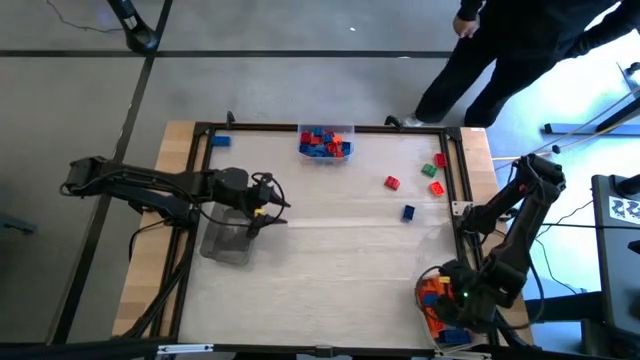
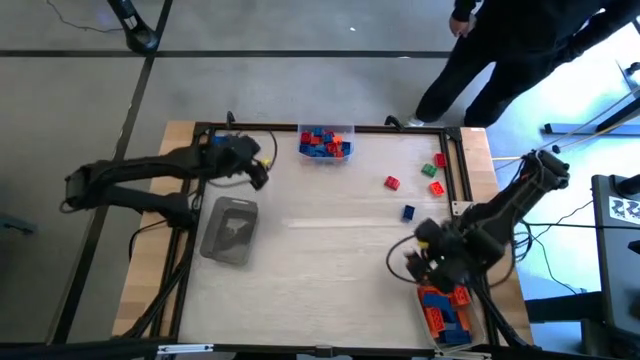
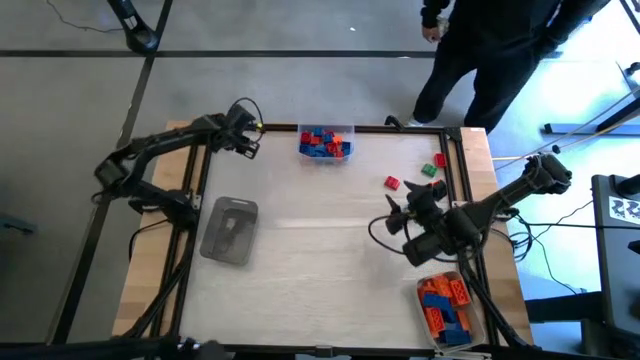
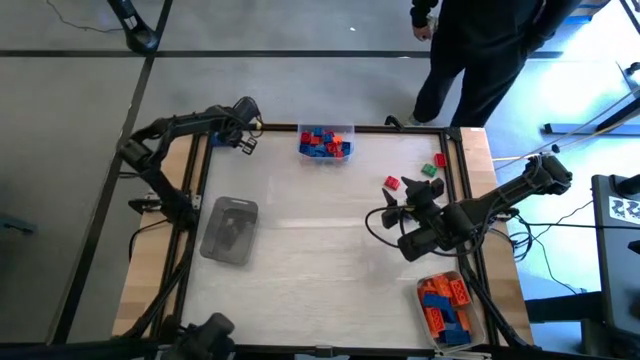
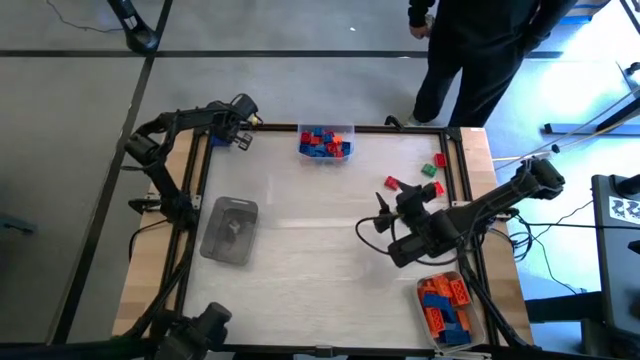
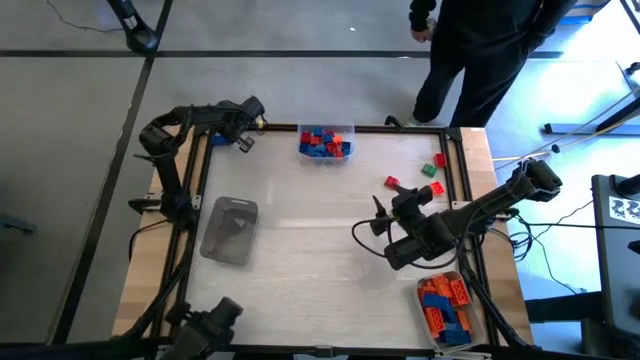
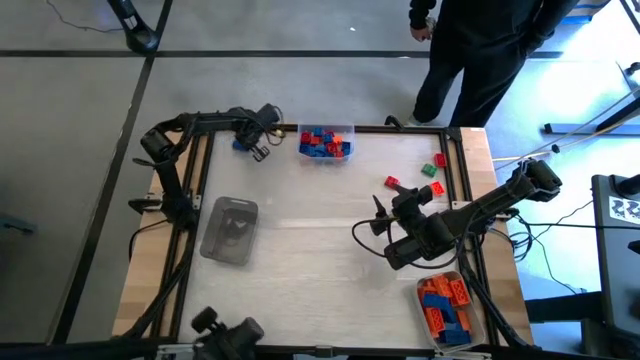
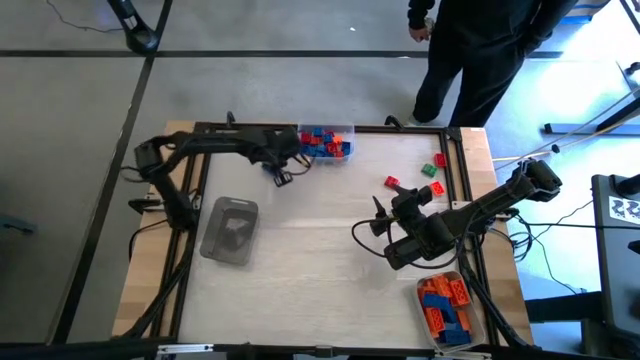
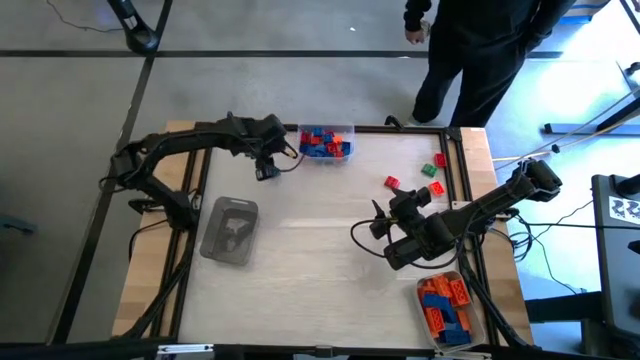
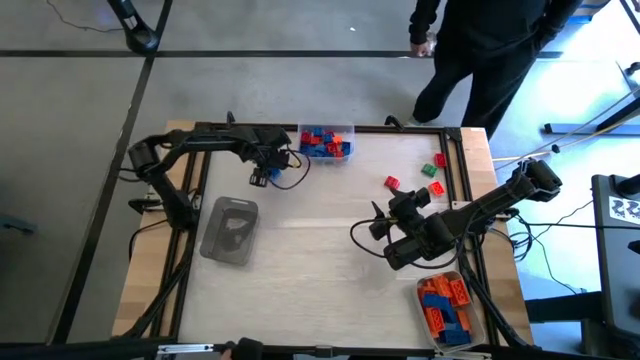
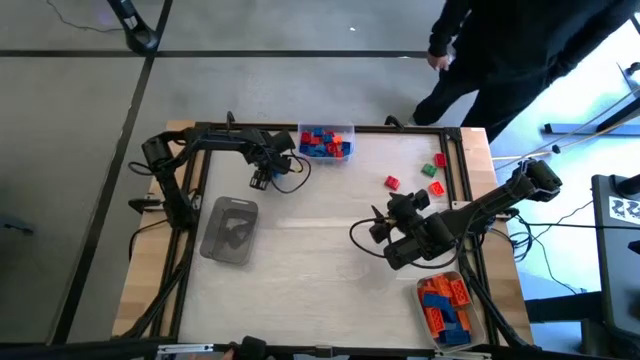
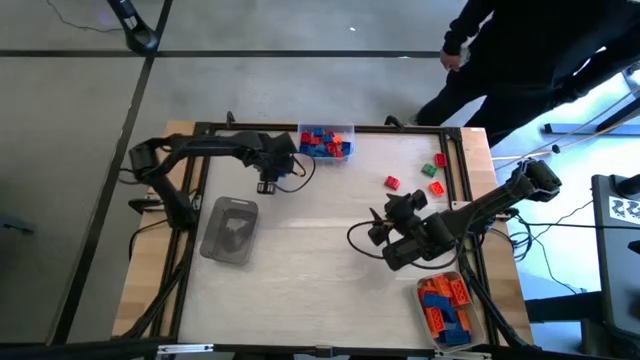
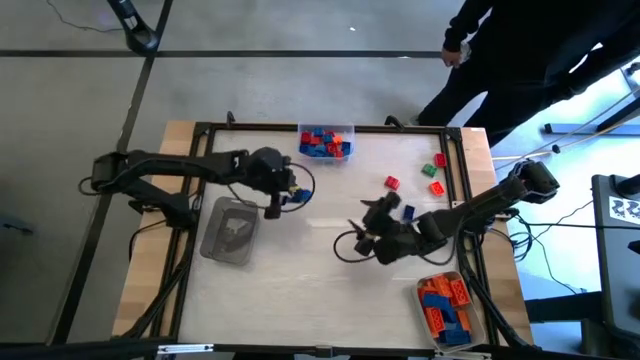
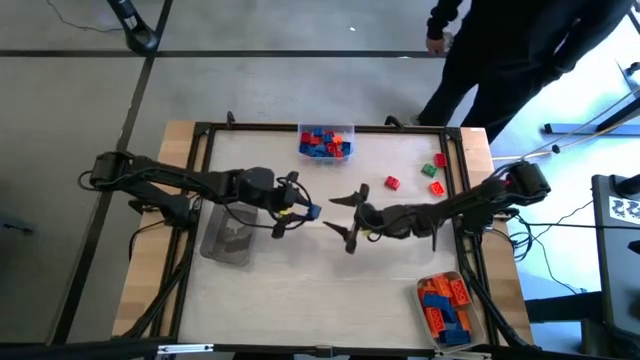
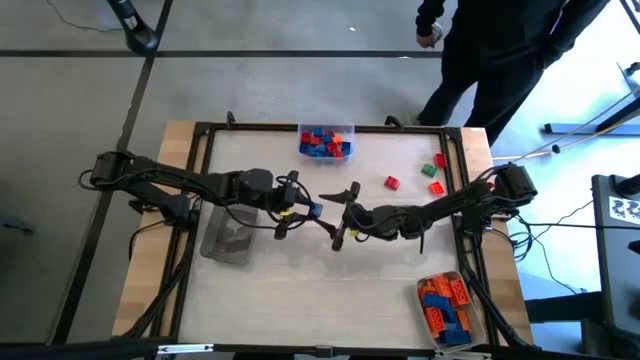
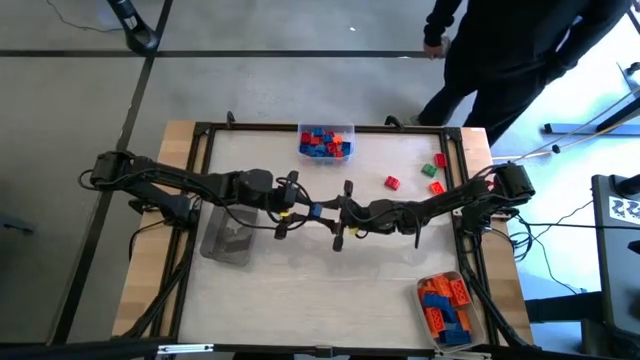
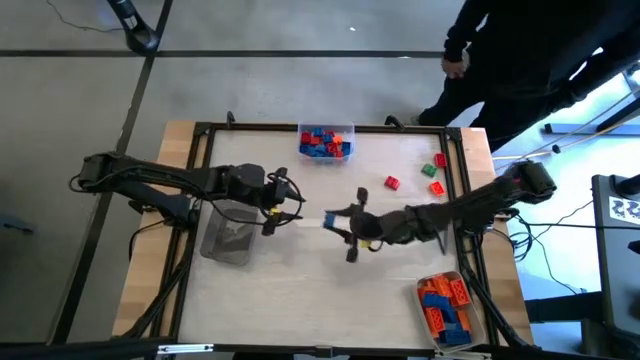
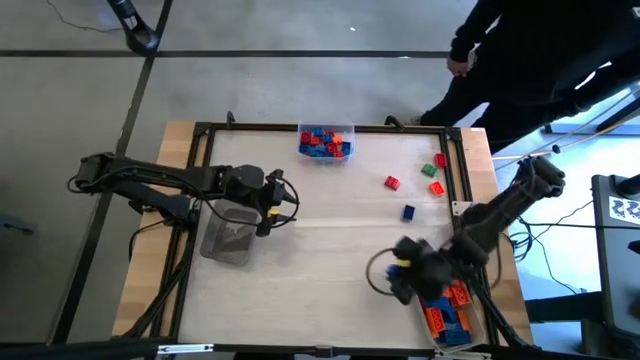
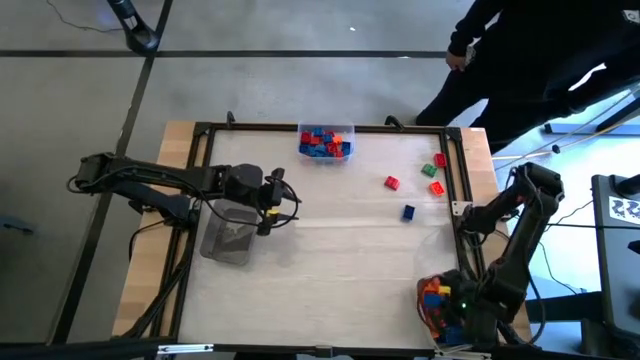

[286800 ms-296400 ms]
Task: Sort blocks by size
Put the blue 8 stud game piece into the gray bin

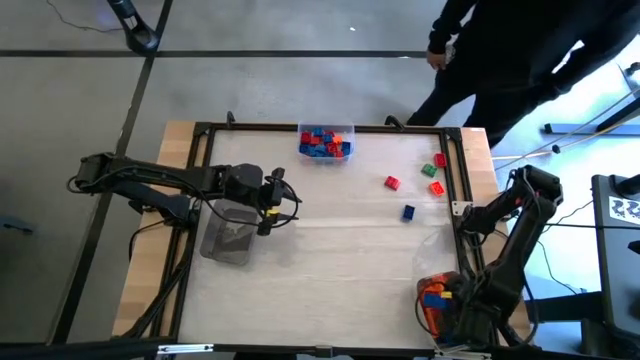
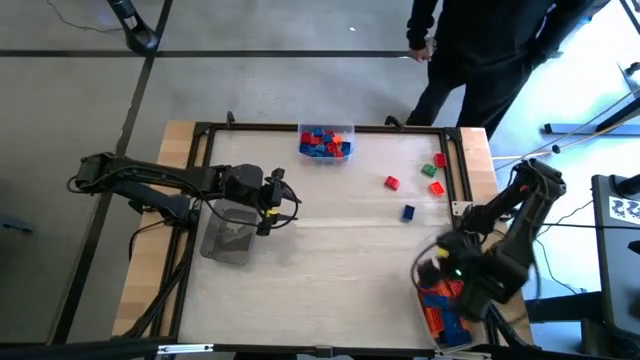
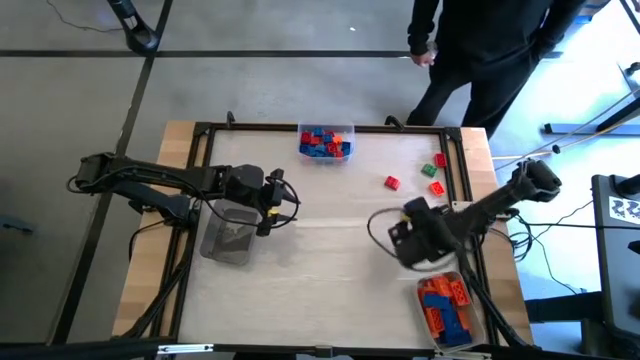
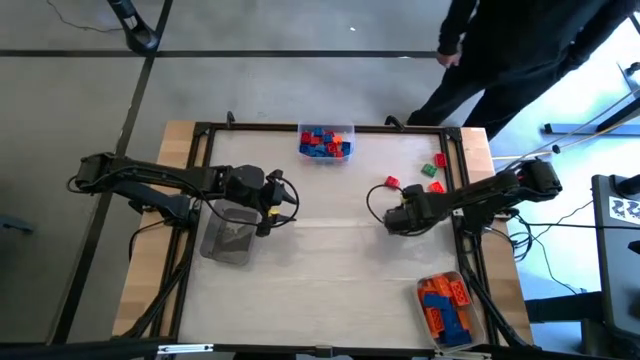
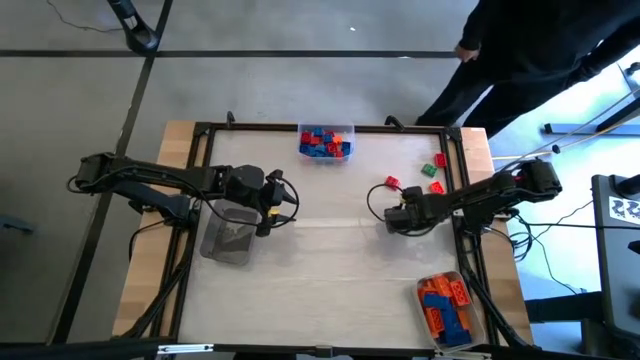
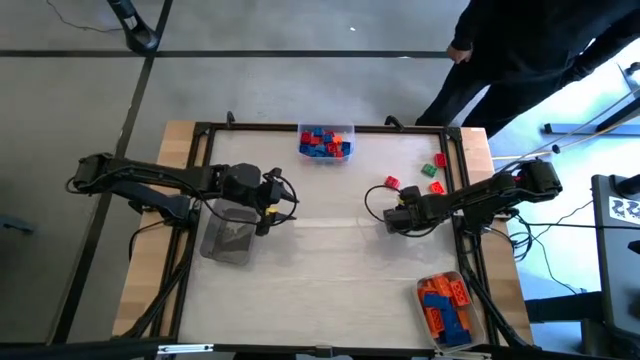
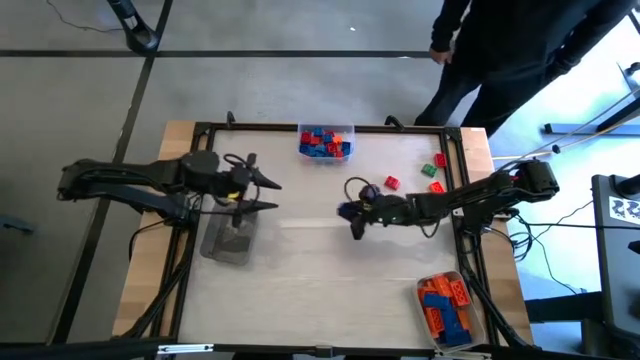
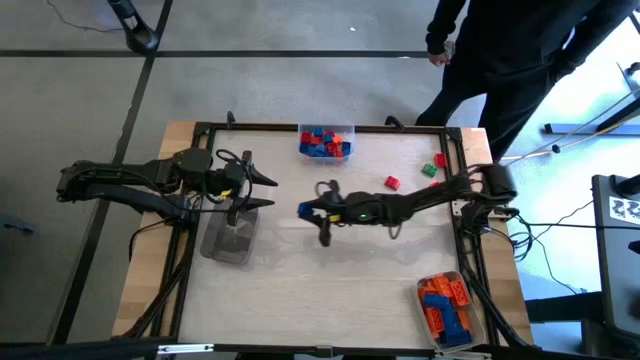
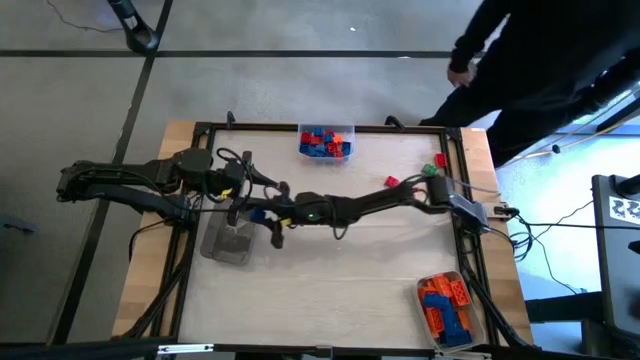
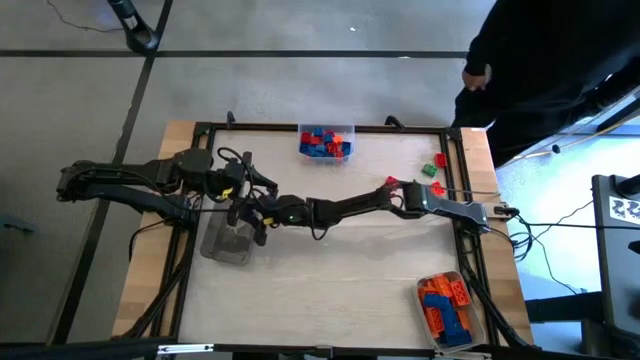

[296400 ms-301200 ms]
Put the blue 4 stud game piece into the black bin

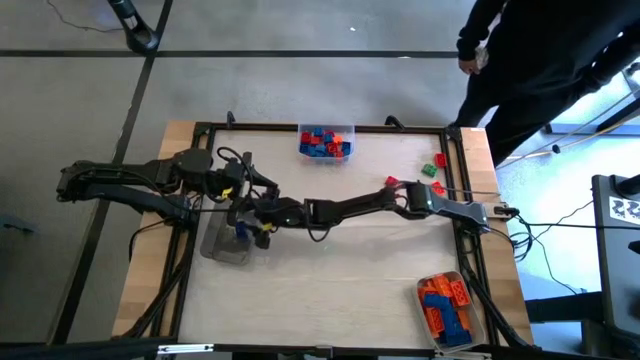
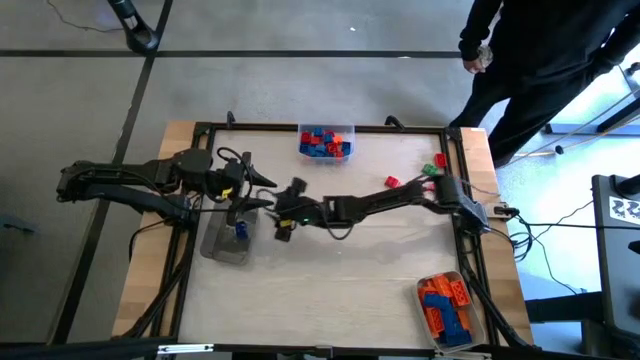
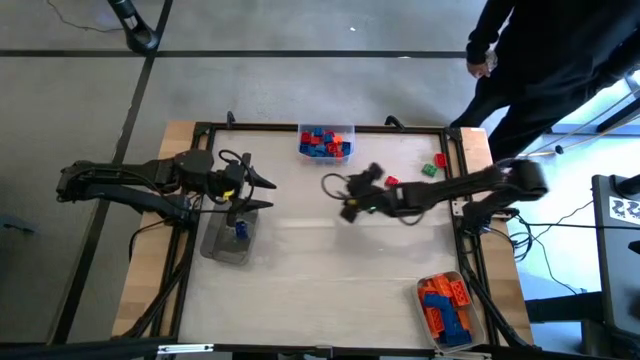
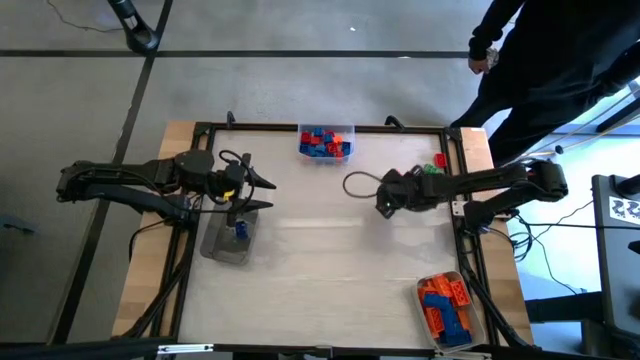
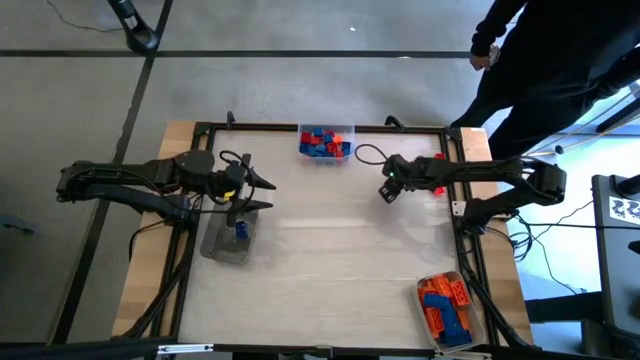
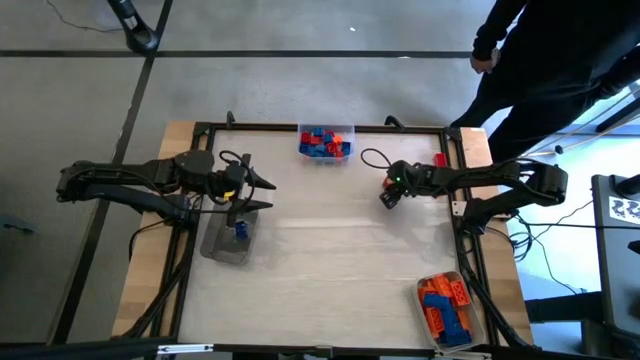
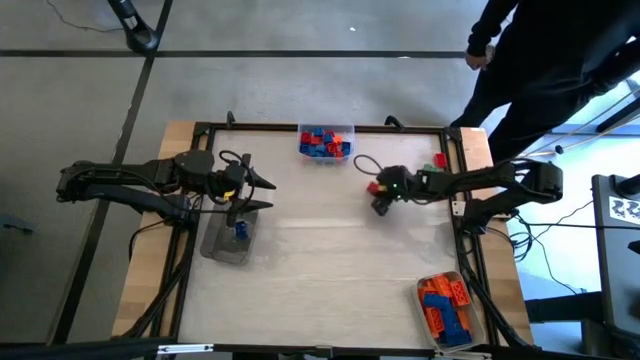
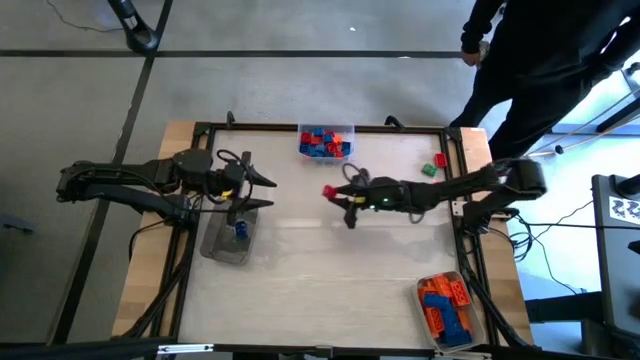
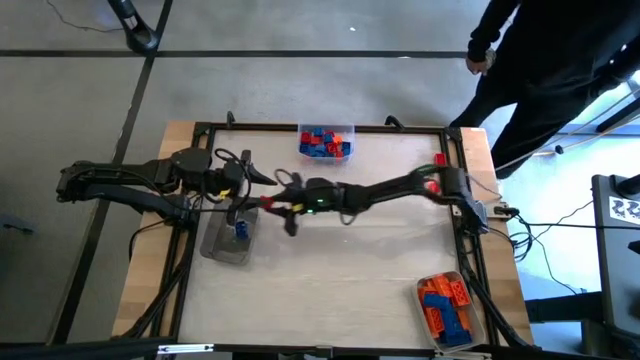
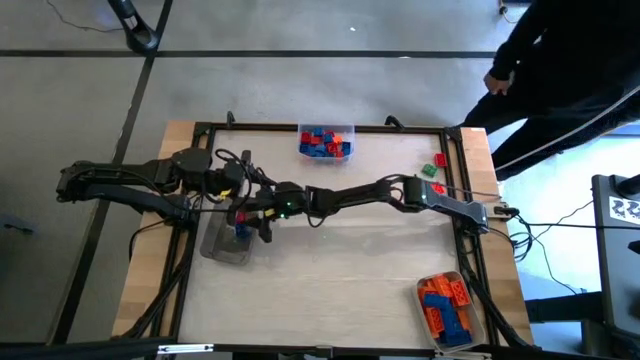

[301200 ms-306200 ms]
Put the red 4 stud game piece into the black bin

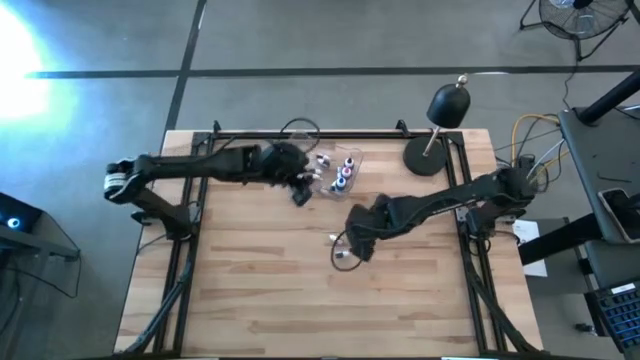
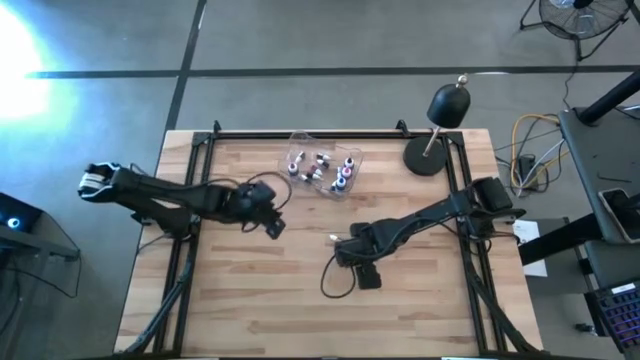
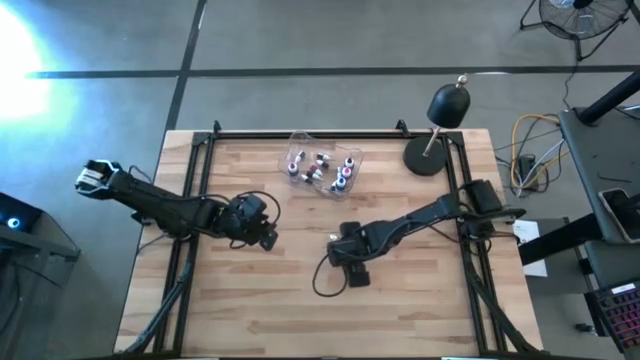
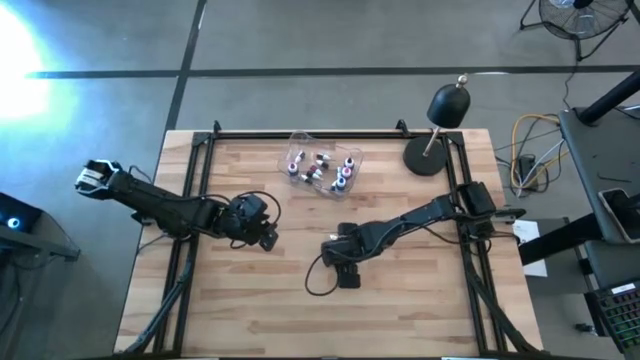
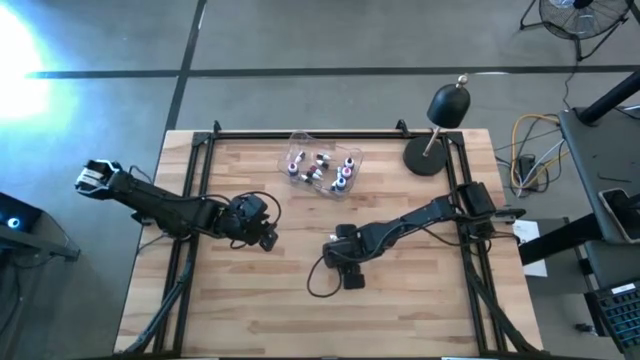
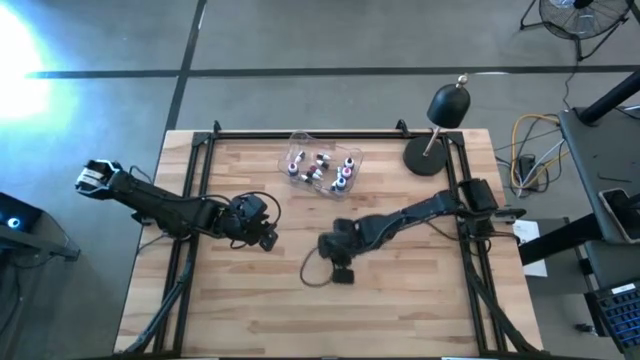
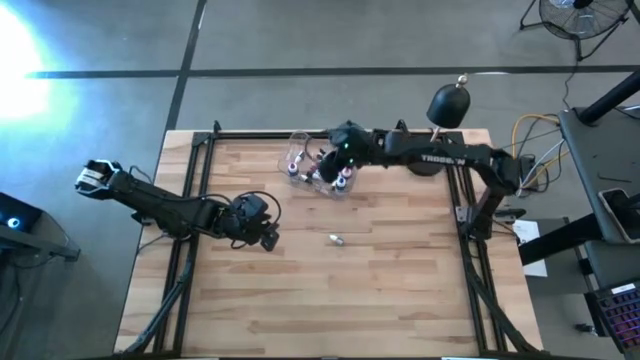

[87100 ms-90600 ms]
Task: Pick & Place food coloring
Put the small purple food coloring bottle into the transparent bin
